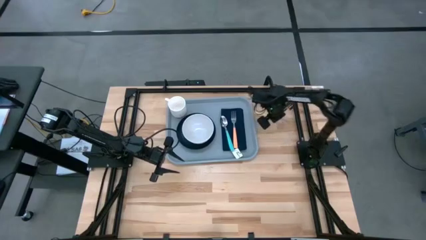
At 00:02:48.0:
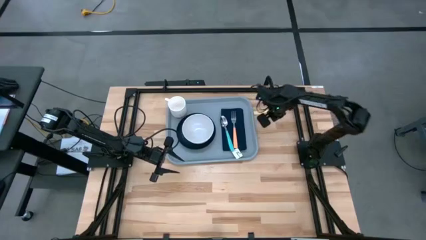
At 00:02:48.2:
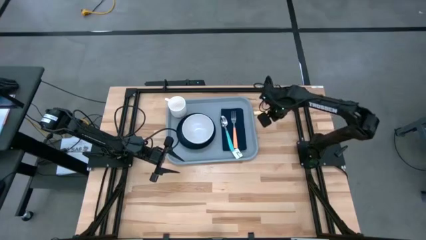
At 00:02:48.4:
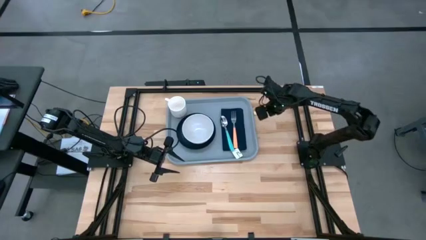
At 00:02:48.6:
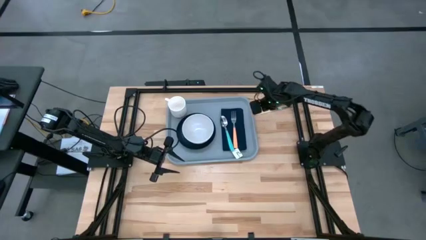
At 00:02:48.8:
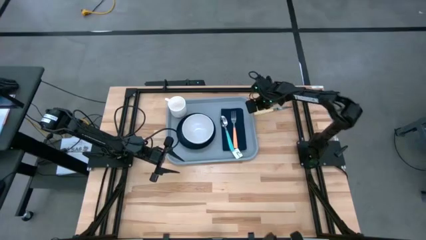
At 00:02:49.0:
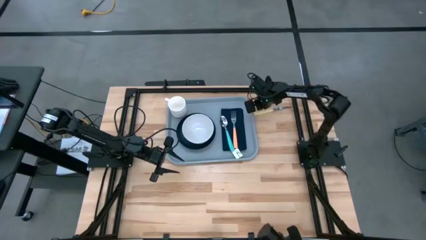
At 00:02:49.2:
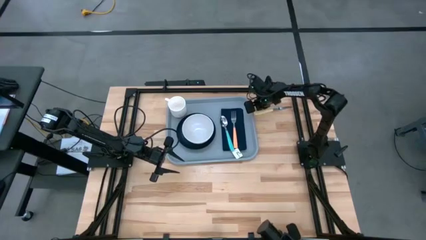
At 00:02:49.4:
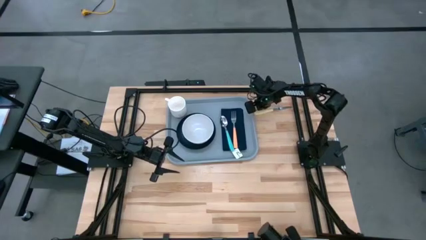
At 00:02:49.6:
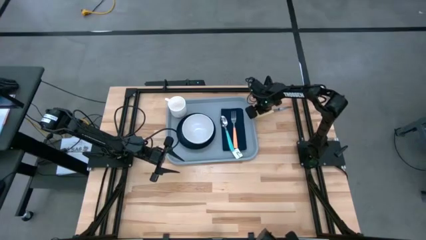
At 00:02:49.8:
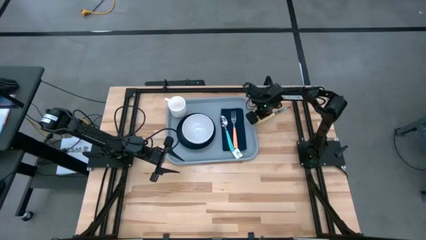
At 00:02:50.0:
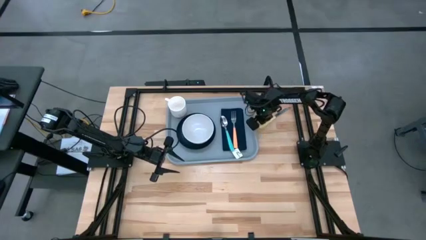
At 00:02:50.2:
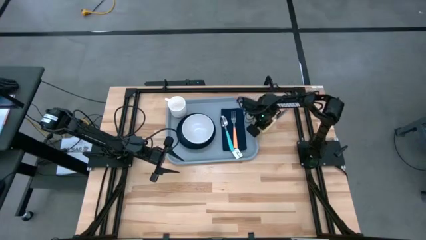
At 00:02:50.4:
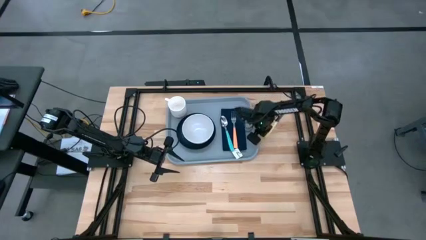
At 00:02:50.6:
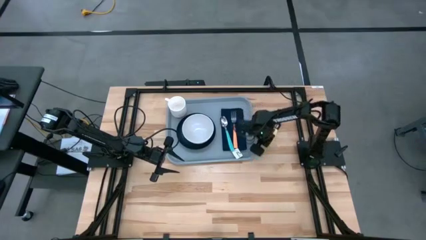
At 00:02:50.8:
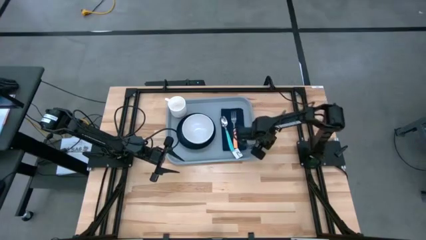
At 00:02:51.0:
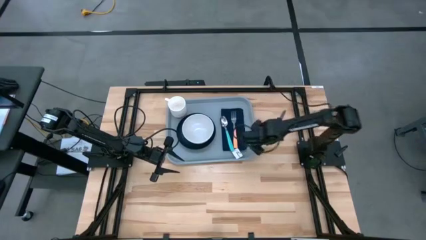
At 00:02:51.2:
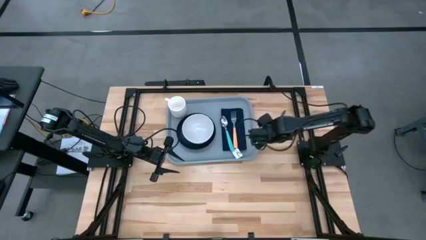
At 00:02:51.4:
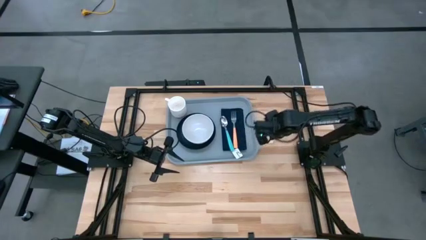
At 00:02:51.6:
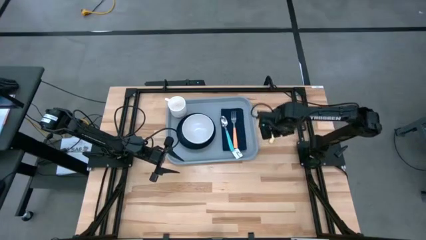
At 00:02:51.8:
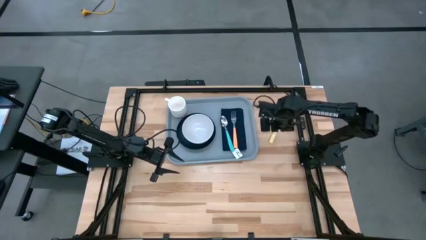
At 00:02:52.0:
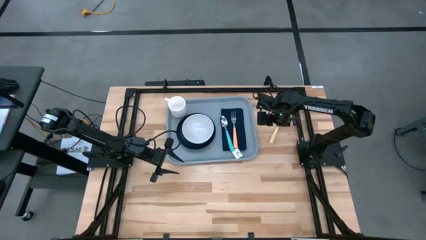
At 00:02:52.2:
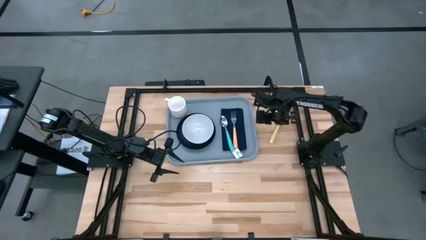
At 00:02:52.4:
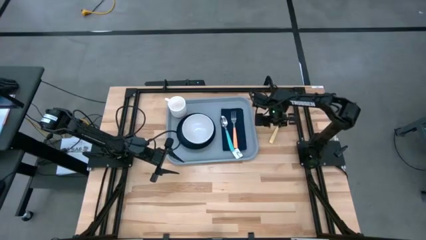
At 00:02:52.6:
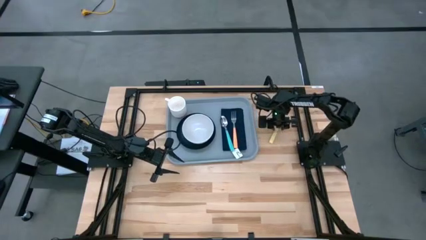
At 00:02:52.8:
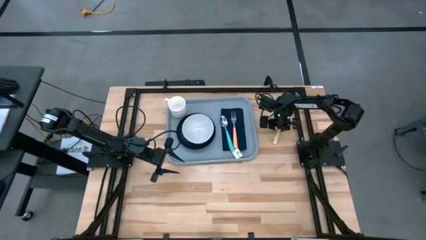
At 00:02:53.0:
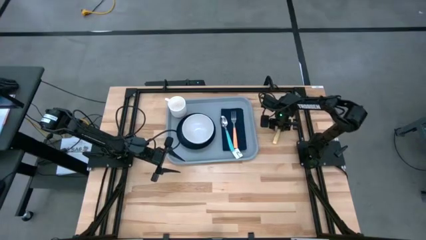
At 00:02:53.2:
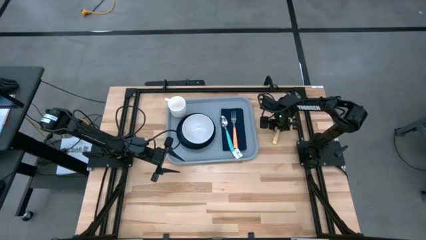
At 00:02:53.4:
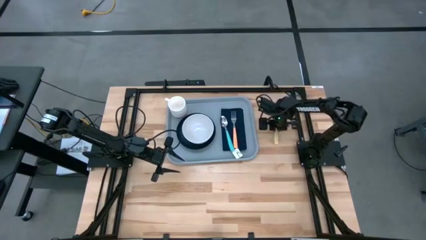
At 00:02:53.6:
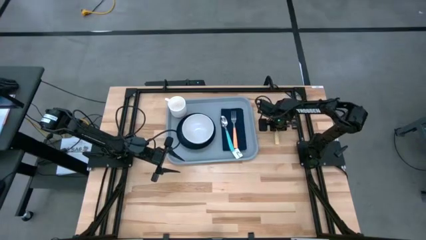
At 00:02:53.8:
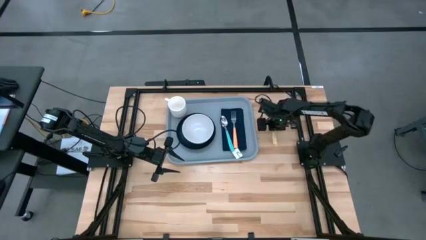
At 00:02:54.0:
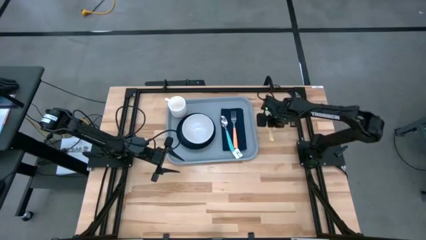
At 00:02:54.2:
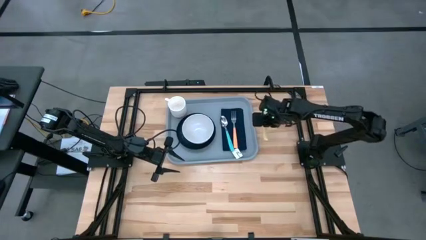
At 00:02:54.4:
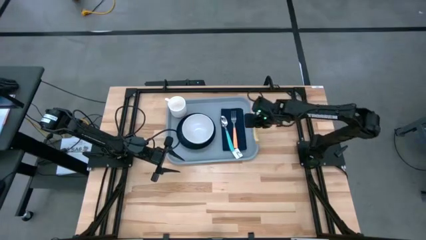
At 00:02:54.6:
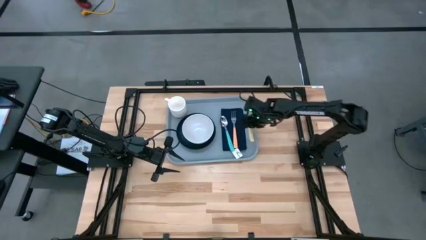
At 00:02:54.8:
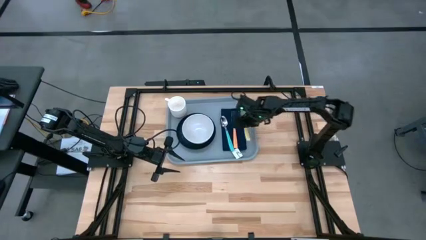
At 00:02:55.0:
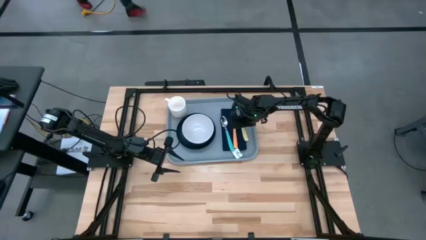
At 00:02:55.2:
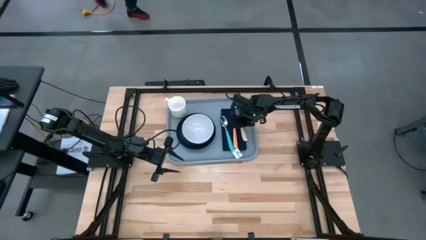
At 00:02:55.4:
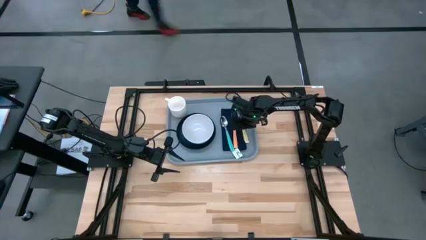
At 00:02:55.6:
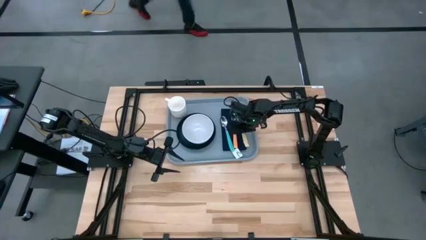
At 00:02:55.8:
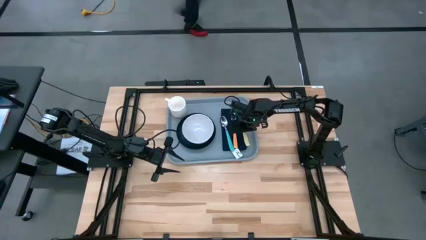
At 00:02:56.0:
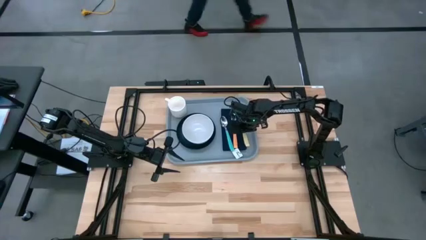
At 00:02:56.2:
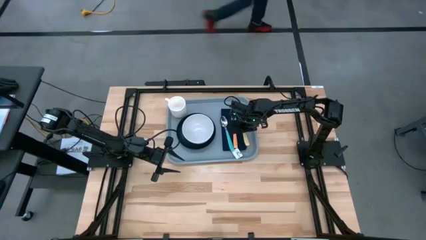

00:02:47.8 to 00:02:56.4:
Task: Set up tray
Put the yellow knife on the black napkin to the right of the orange fork

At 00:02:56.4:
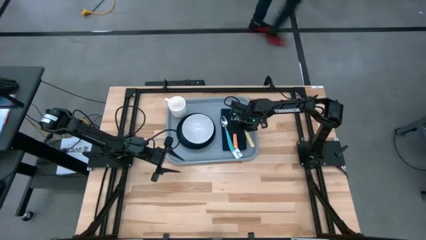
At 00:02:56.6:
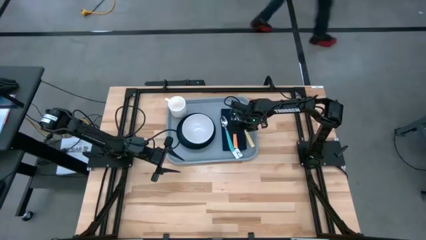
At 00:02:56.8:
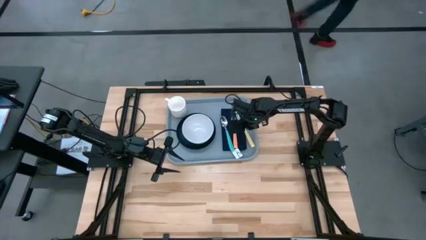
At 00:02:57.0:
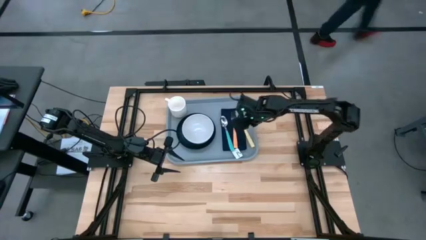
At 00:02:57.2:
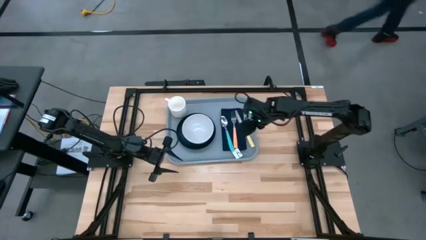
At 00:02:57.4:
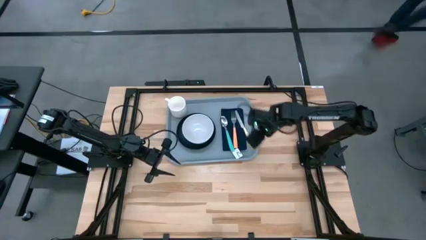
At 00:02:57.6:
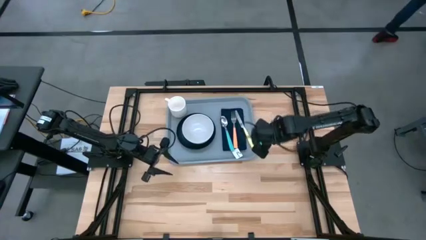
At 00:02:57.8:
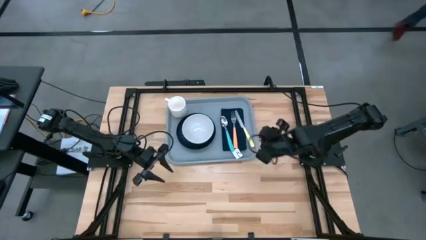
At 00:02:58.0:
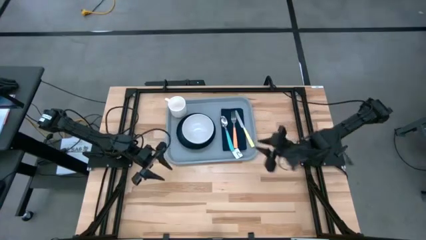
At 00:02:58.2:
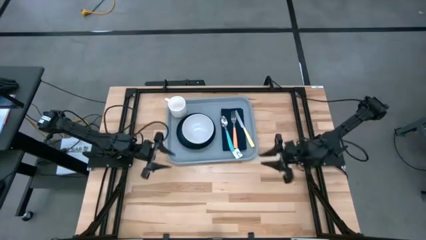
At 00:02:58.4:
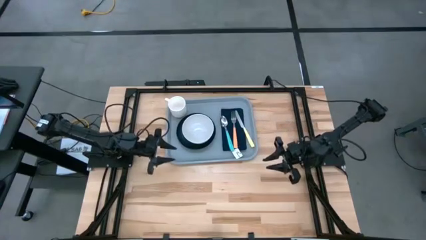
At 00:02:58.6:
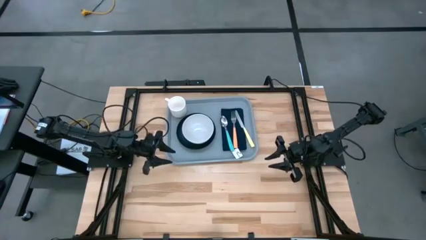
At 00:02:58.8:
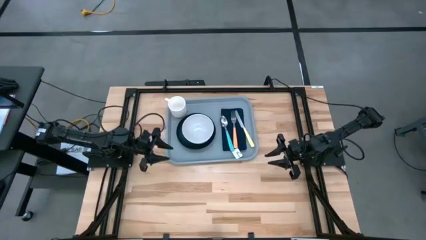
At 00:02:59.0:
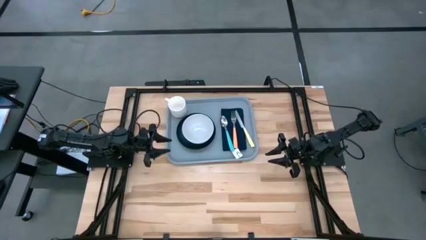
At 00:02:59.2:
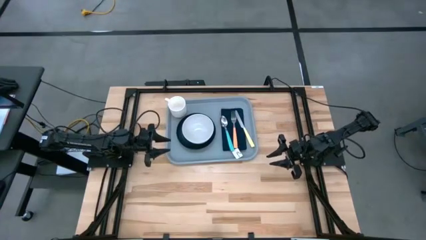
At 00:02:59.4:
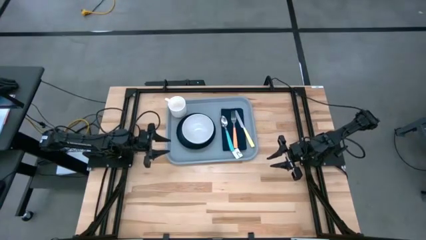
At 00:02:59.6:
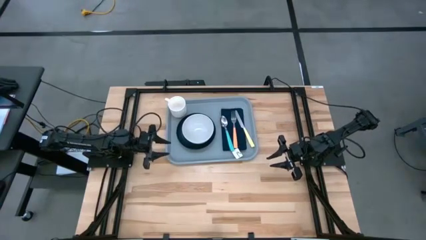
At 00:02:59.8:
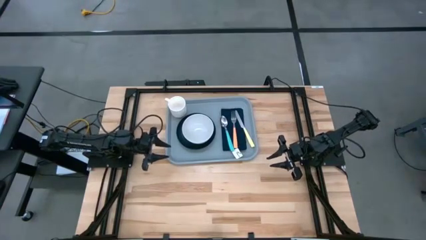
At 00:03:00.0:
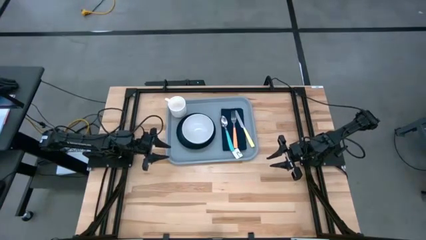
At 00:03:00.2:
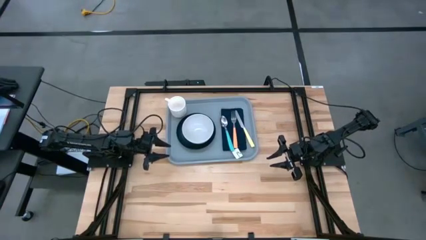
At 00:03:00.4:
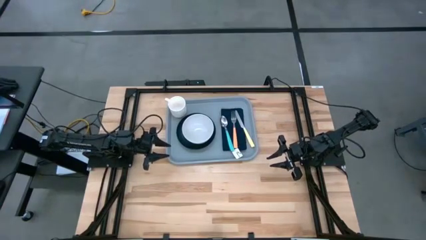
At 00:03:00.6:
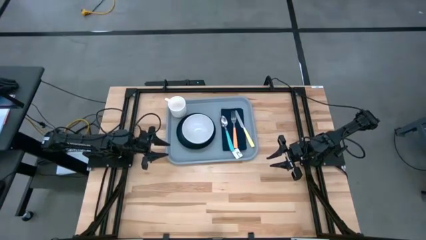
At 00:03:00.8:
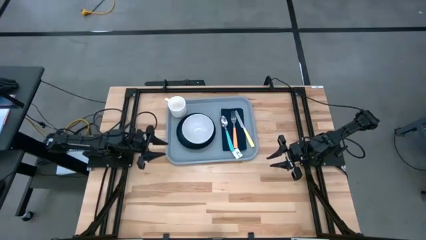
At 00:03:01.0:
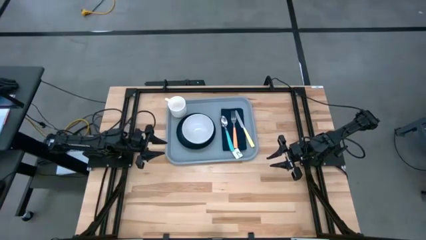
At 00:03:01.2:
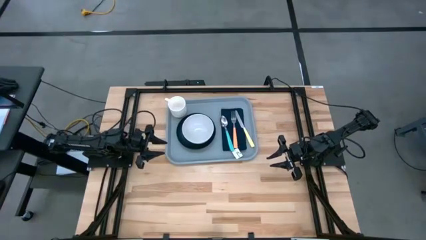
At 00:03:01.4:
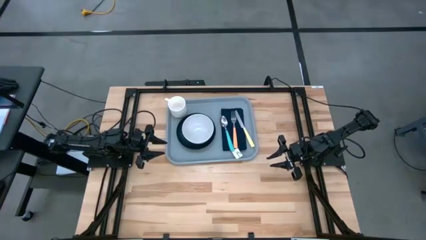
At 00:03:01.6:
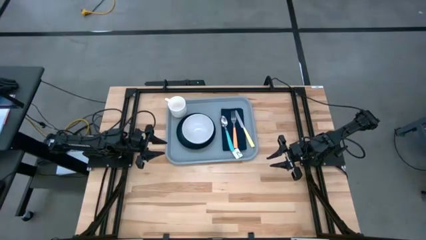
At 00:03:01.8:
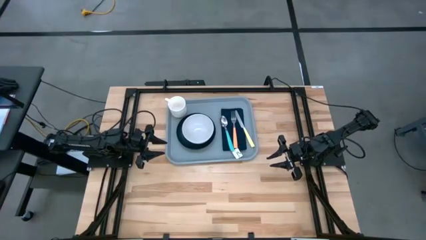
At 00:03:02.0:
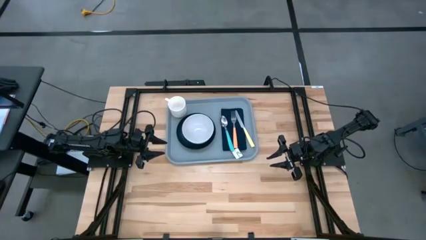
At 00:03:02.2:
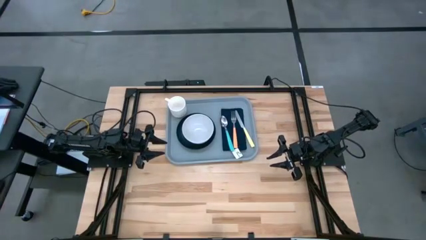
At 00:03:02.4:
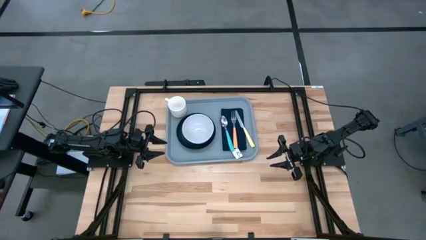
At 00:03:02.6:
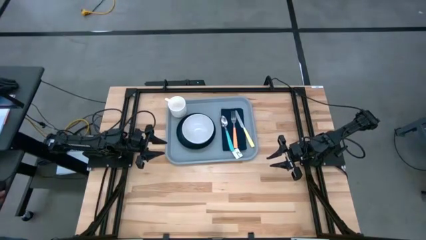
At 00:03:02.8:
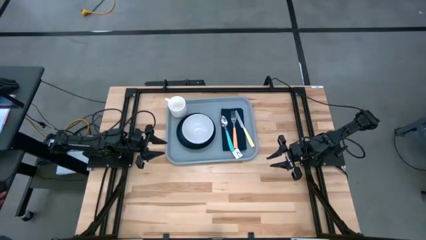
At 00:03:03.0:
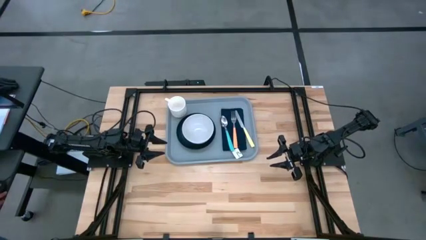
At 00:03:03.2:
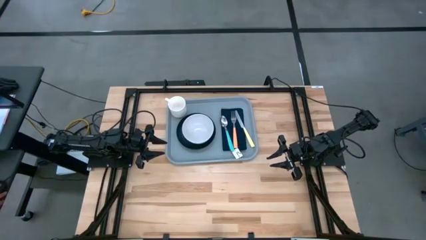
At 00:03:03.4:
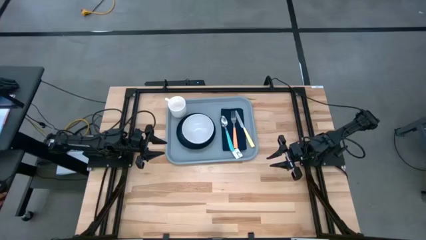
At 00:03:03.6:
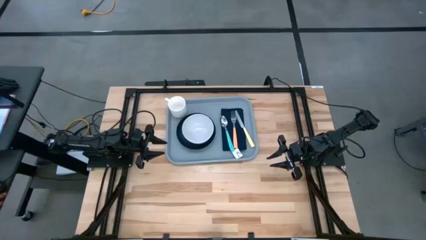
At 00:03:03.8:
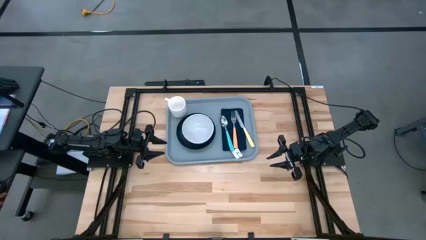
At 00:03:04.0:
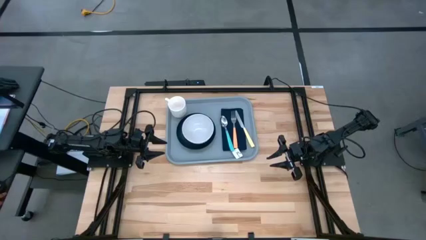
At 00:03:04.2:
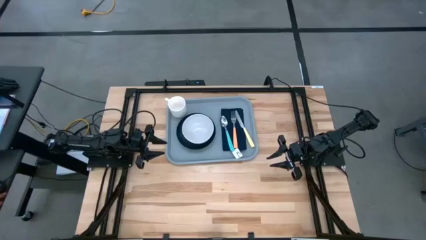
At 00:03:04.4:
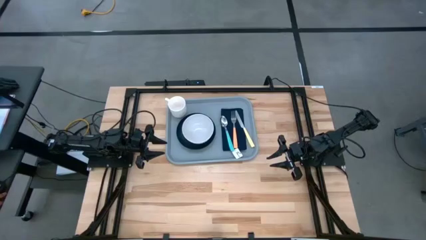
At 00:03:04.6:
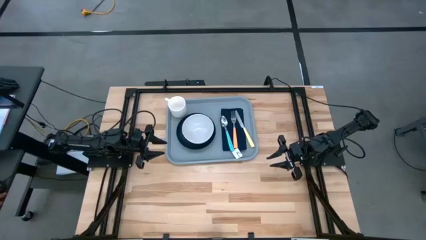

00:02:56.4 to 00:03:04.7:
Return to Home Position
